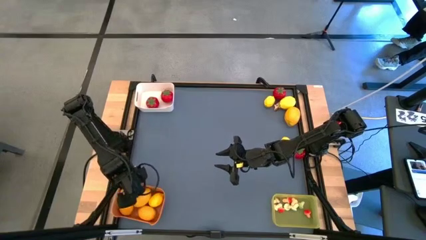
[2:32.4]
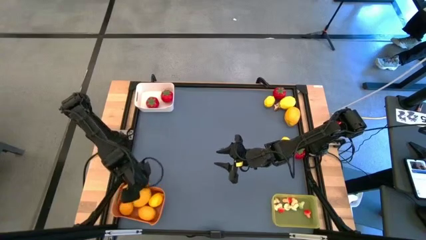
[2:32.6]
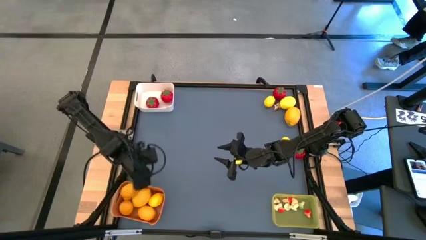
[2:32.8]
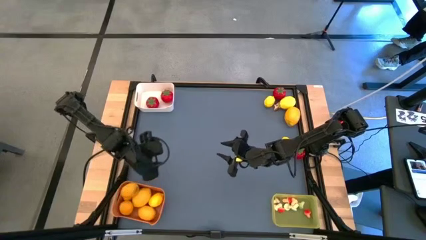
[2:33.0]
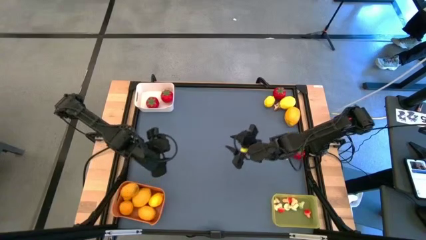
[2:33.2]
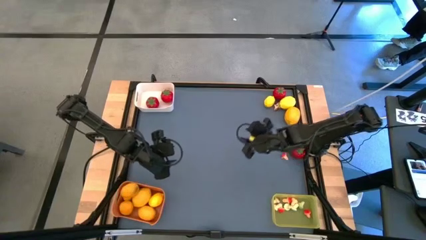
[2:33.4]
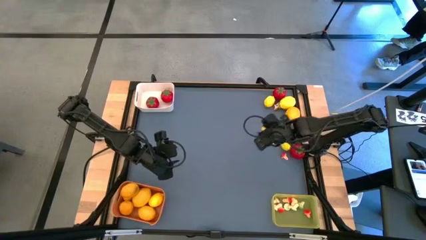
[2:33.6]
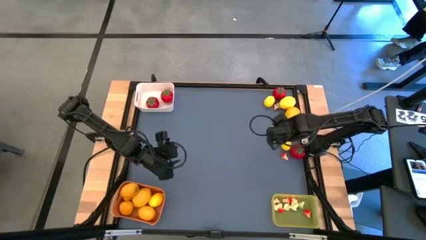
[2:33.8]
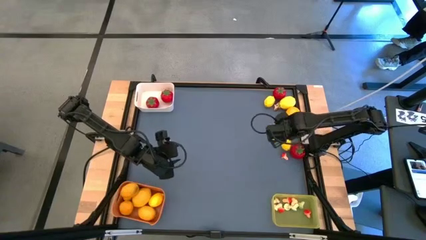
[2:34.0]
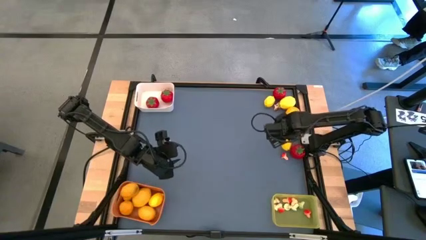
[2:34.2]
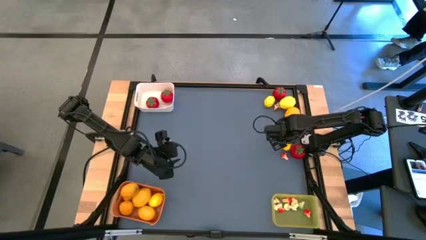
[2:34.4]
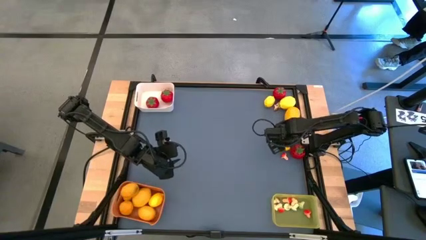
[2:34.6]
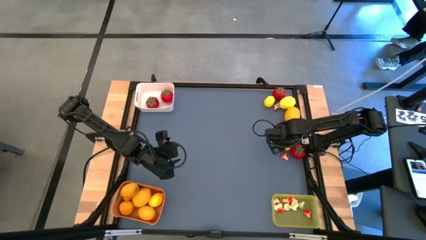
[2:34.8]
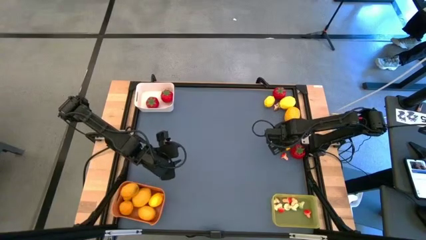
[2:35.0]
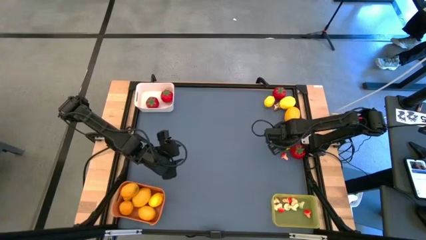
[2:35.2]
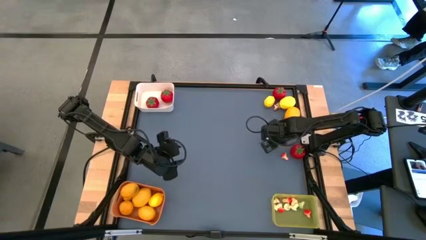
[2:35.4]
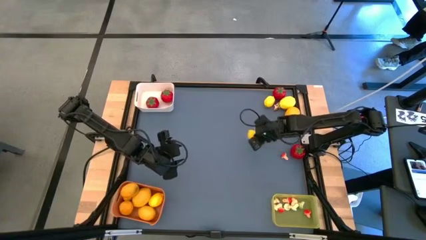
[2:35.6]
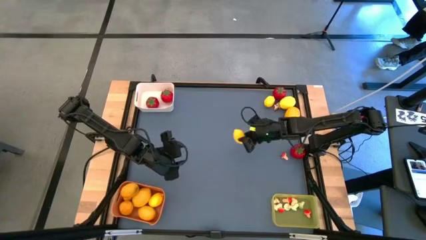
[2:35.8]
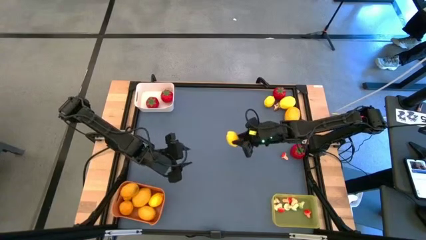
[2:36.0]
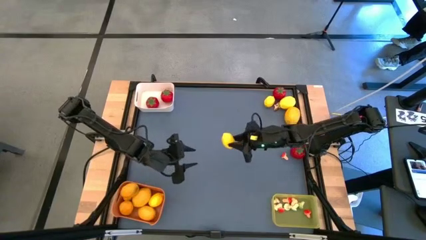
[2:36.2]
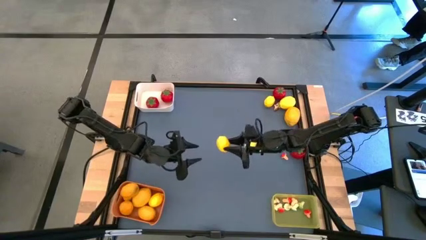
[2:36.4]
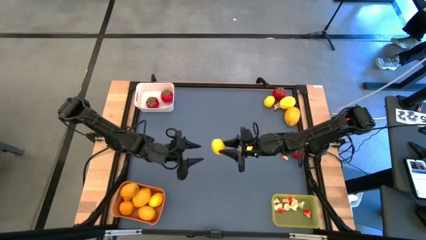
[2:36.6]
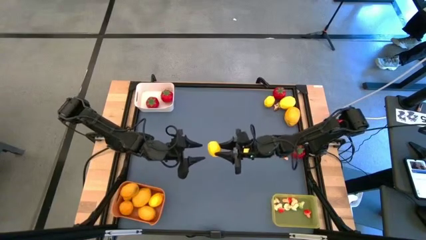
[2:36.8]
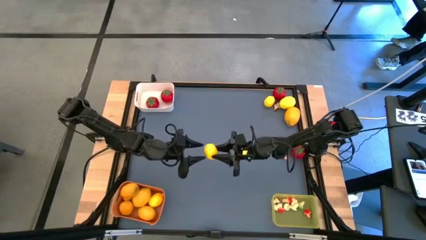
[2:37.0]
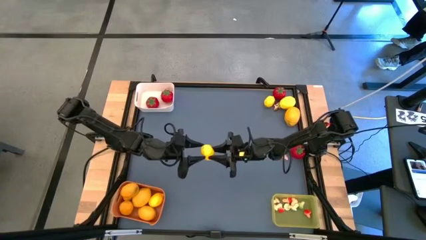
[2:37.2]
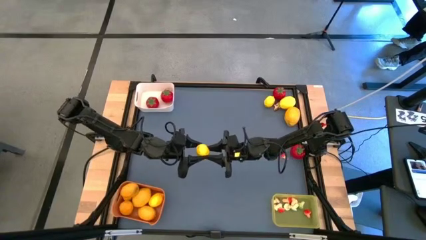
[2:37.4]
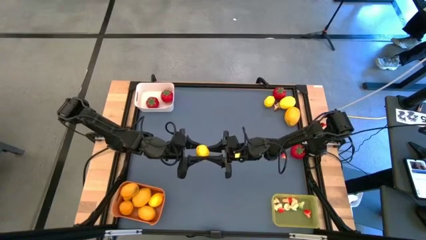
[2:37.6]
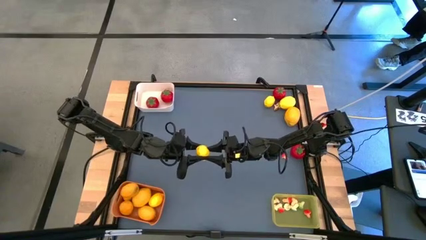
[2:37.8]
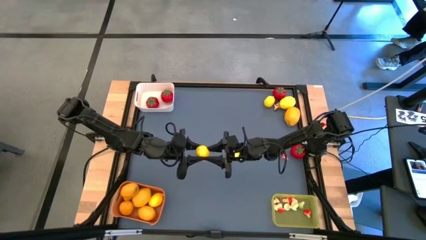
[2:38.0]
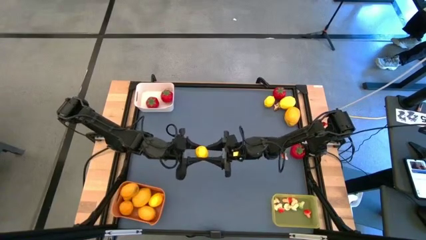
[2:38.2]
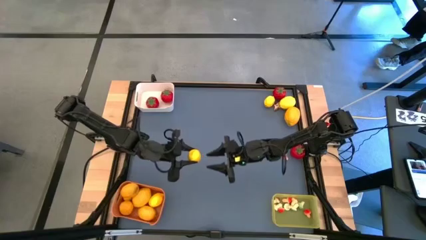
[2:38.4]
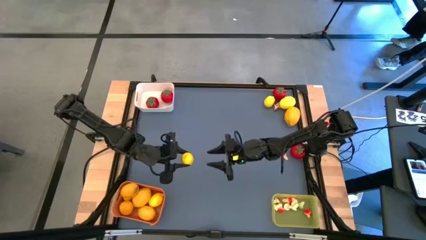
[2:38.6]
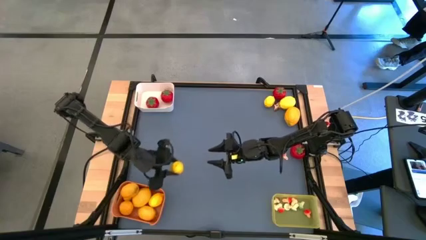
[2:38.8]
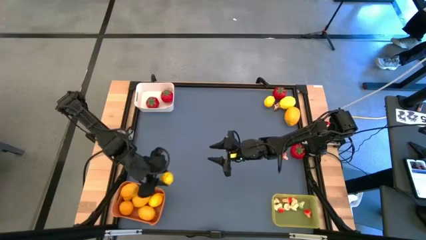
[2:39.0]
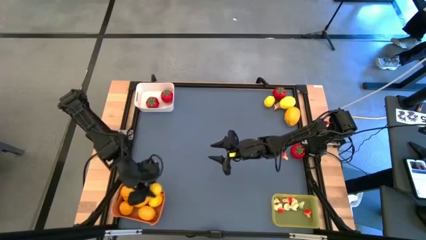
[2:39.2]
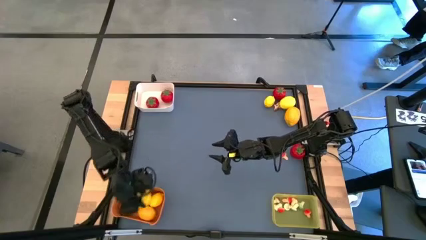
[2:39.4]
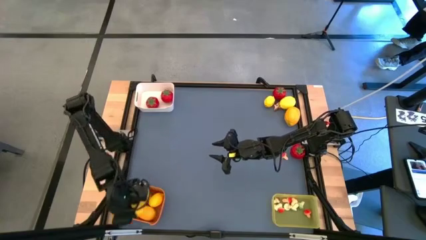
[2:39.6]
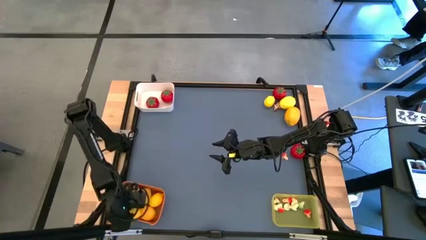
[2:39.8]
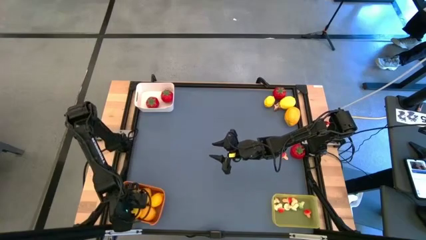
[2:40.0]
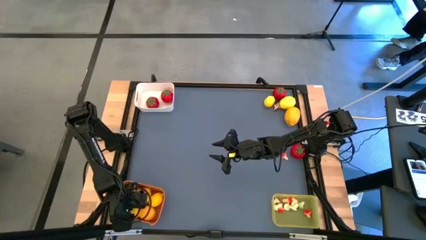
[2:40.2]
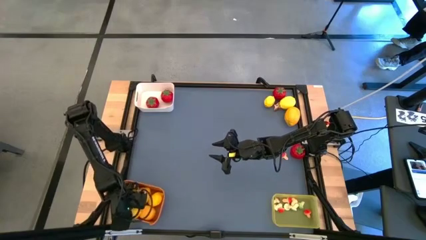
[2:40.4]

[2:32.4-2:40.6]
Task: Sort produce into baskets
Put the yellow lemon into the orange bin

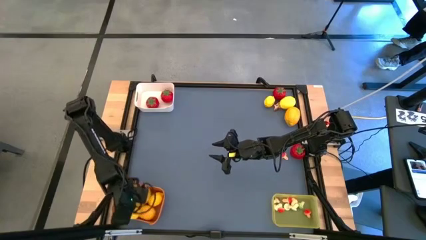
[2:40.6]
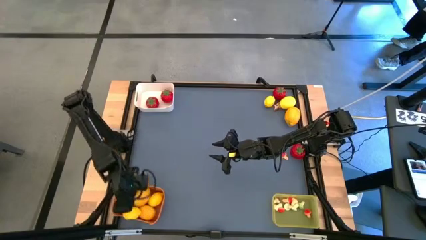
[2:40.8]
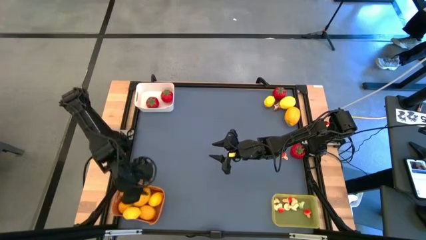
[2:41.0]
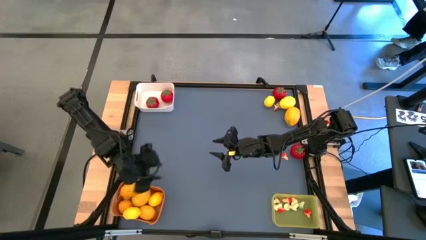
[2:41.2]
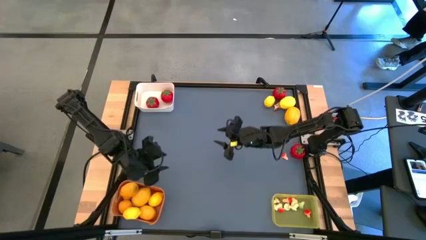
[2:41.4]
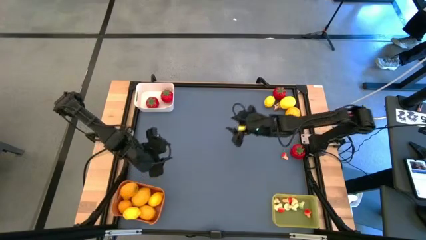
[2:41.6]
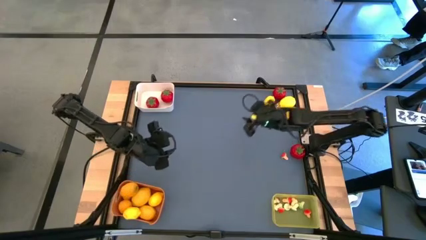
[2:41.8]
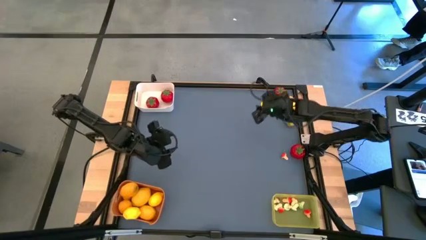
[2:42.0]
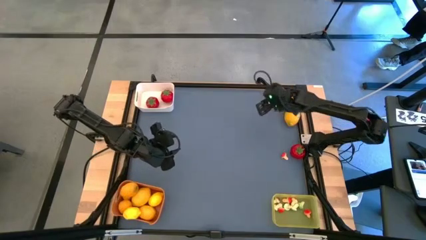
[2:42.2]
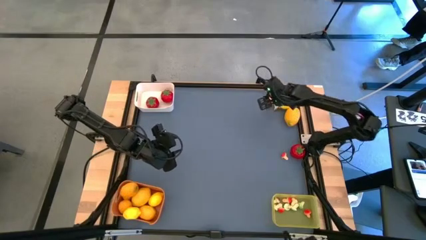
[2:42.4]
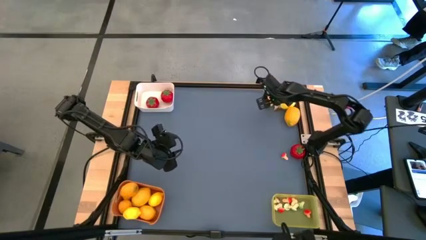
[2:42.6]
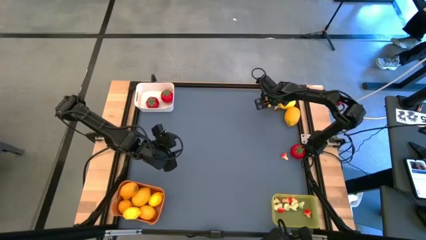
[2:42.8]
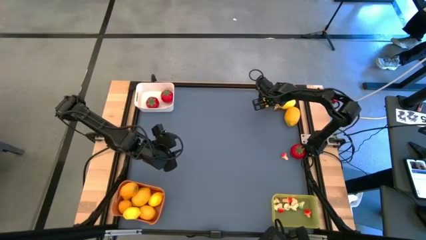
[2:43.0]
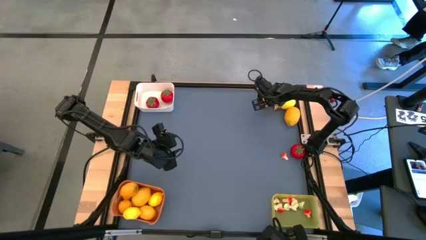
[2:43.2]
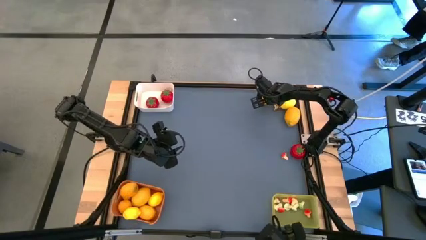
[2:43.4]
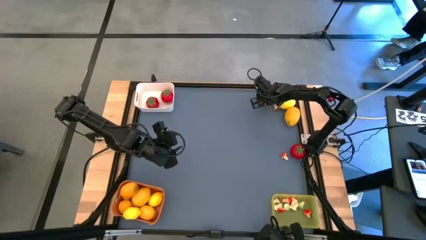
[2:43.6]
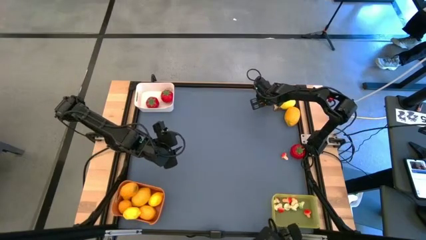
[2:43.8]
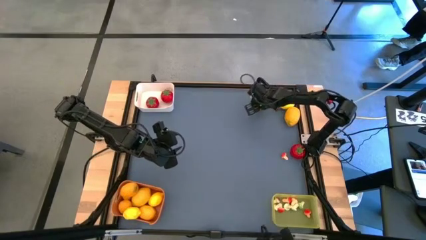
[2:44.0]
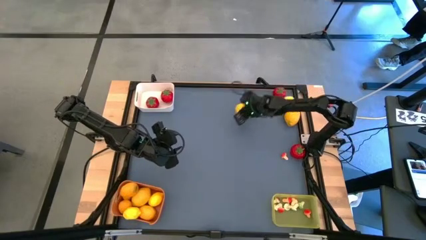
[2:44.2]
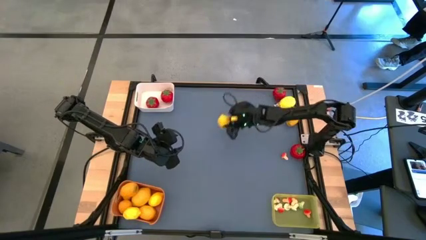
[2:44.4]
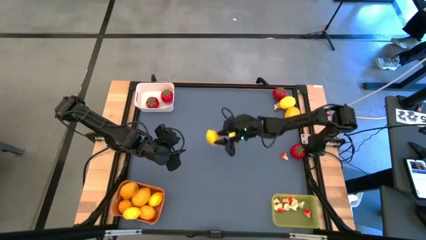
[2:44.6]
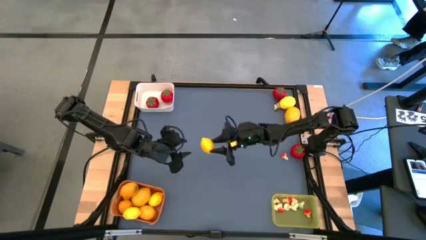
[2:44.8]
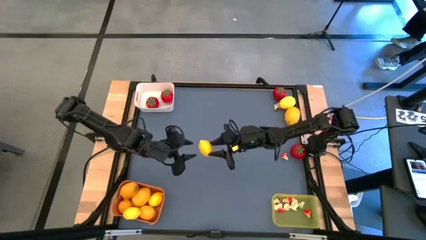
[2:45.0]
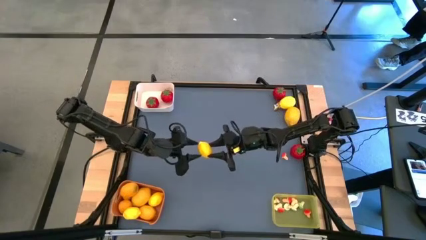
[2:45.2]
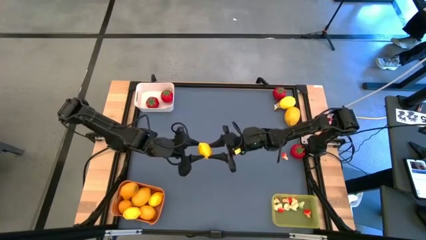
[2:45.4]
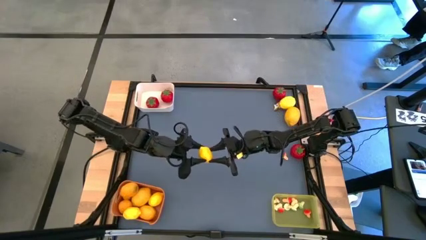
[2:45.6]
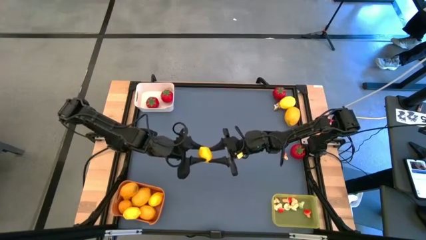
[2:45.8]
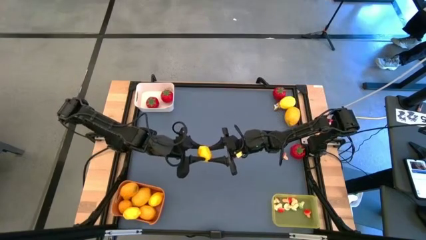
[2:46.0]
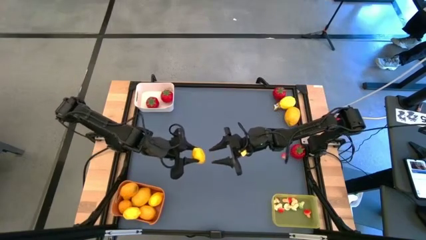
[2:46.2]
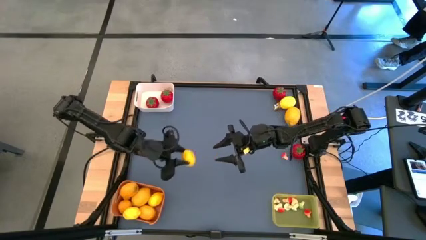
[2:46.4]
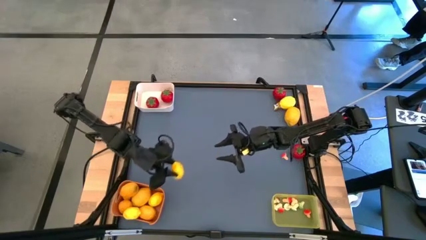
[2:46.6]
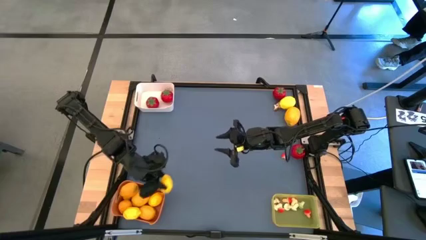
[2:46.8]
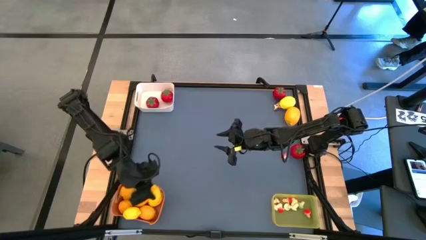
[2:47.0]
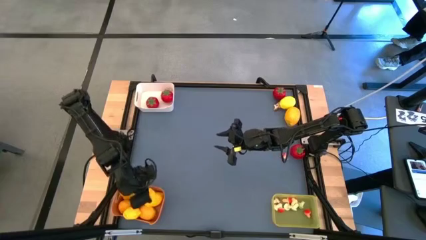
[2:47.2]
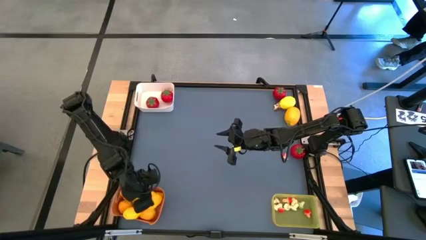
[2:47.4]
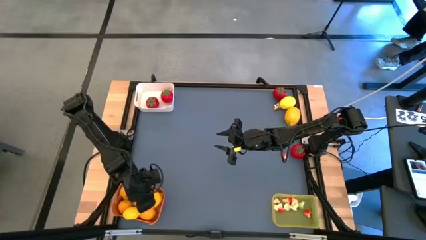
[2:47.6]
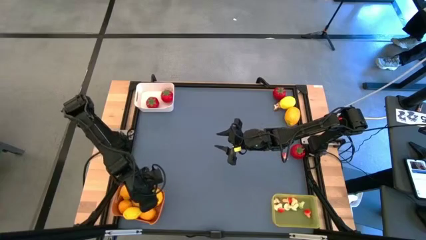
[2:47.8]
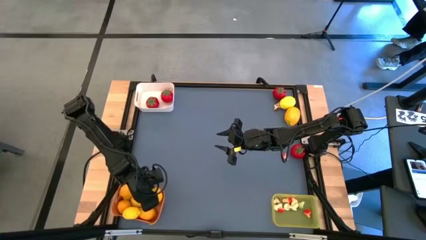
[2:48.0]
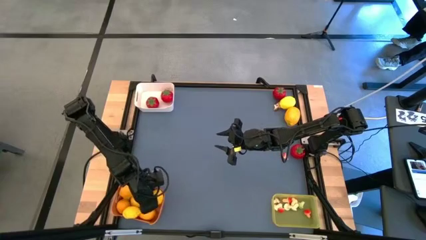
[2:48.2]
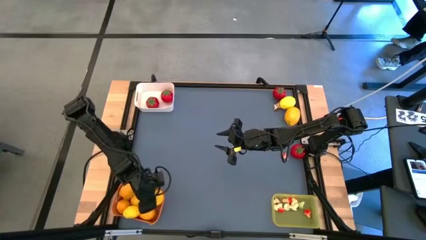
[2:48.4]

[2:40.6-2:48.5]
Put the yellow lemon into the orange bin
